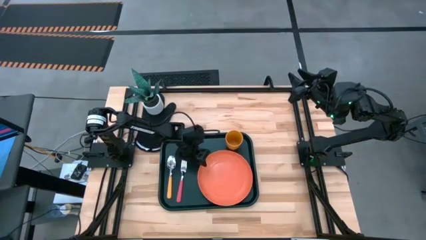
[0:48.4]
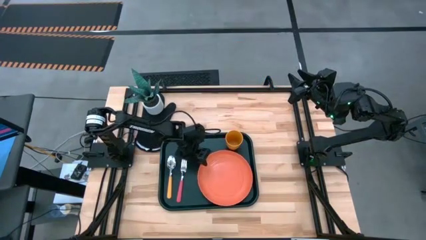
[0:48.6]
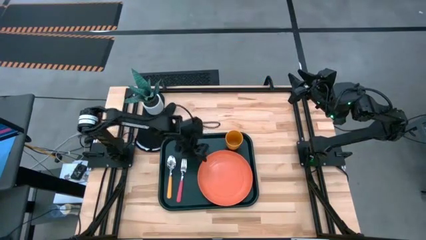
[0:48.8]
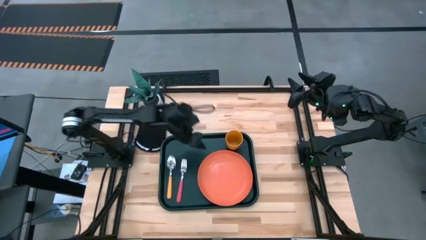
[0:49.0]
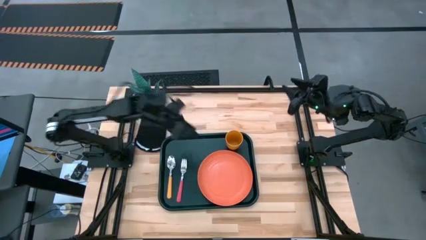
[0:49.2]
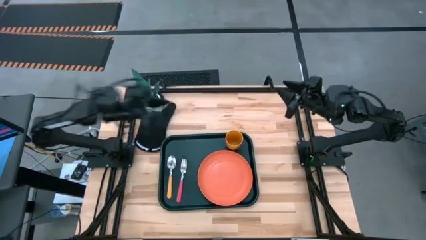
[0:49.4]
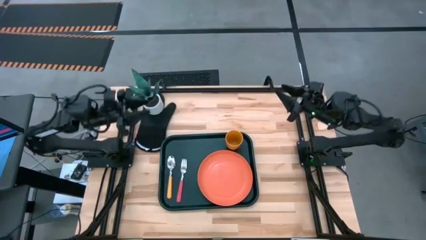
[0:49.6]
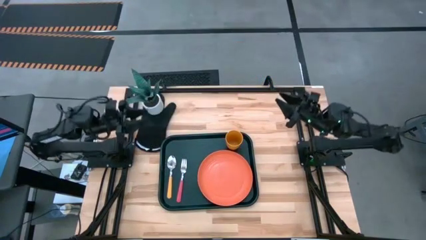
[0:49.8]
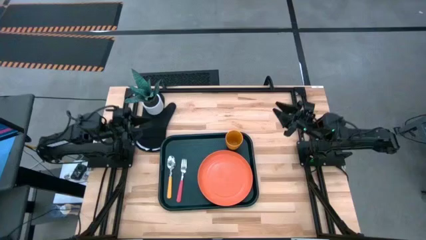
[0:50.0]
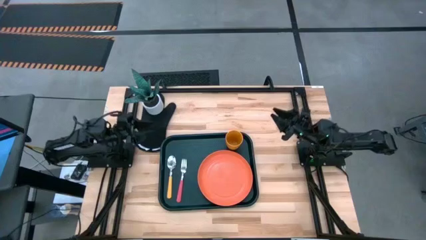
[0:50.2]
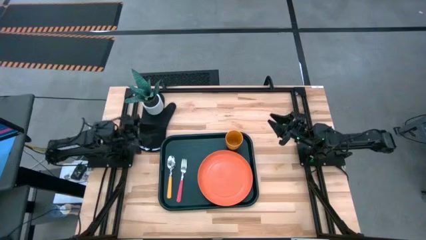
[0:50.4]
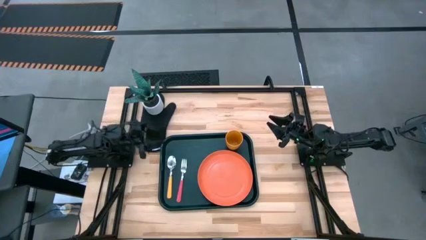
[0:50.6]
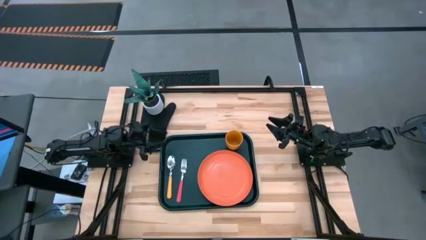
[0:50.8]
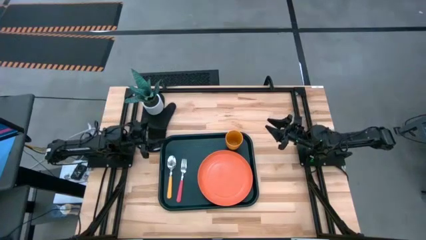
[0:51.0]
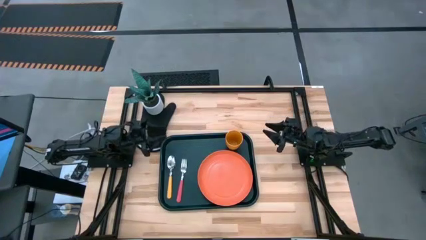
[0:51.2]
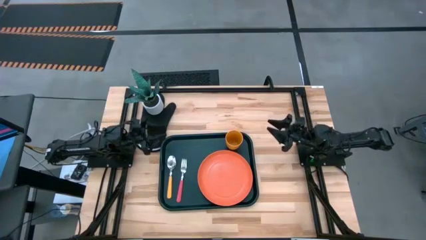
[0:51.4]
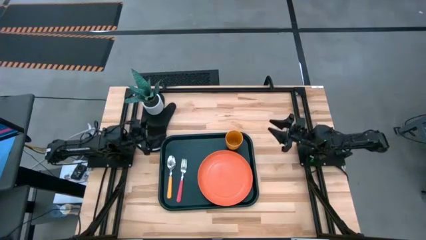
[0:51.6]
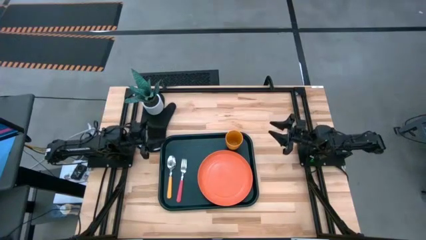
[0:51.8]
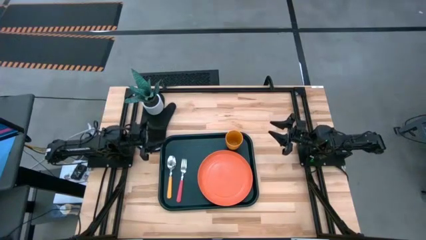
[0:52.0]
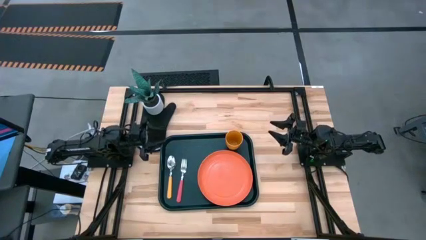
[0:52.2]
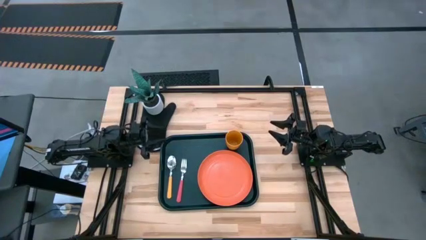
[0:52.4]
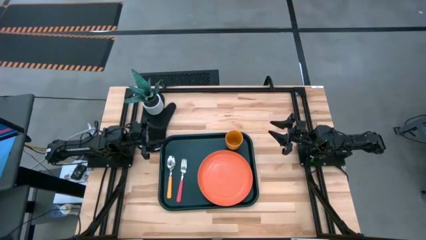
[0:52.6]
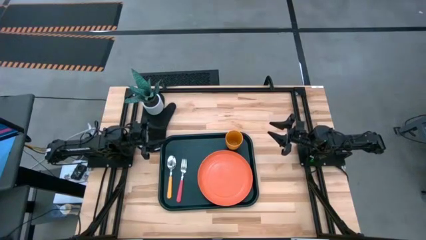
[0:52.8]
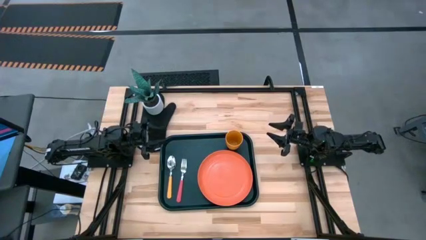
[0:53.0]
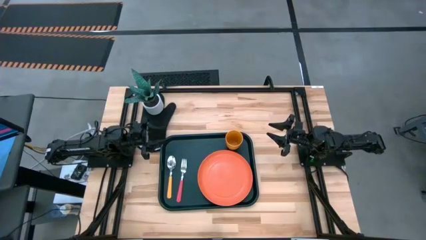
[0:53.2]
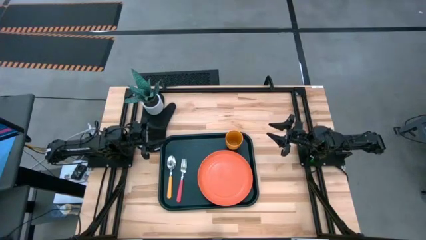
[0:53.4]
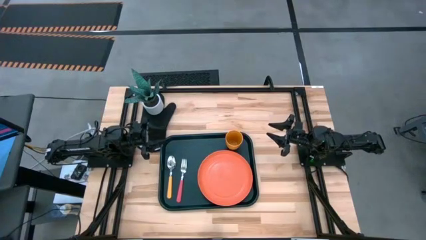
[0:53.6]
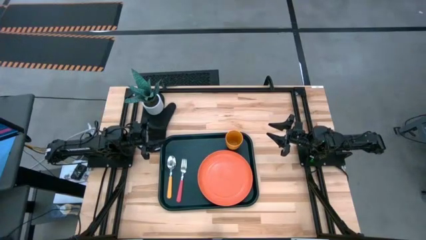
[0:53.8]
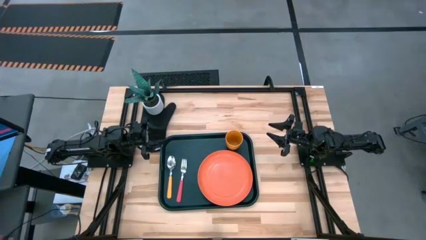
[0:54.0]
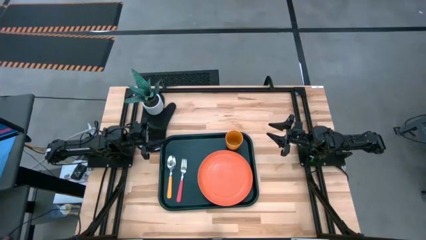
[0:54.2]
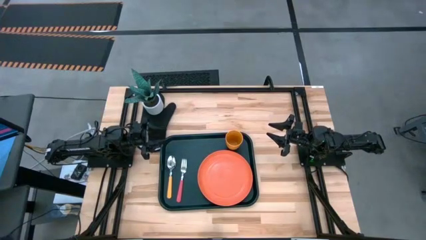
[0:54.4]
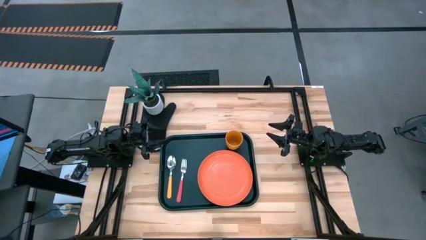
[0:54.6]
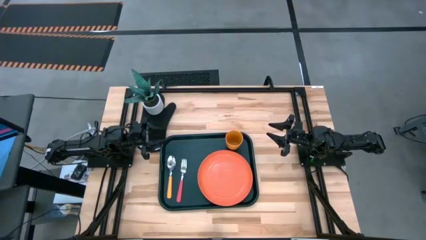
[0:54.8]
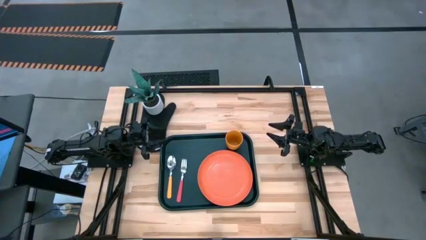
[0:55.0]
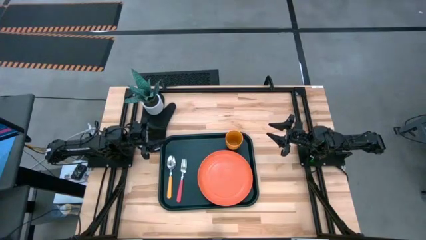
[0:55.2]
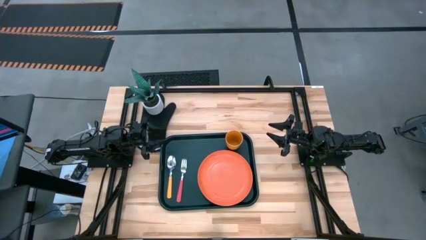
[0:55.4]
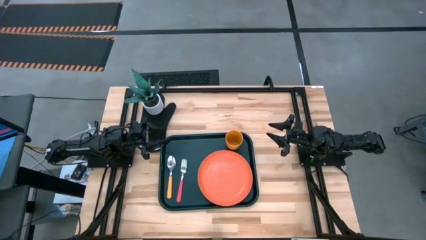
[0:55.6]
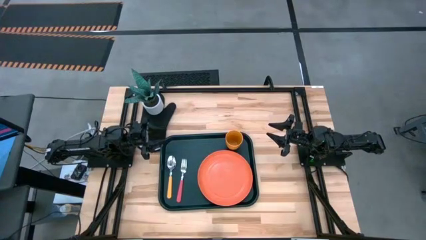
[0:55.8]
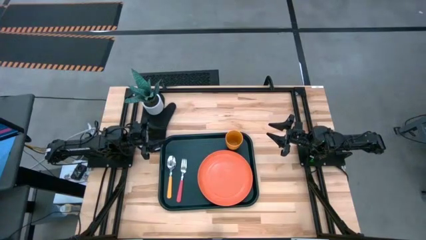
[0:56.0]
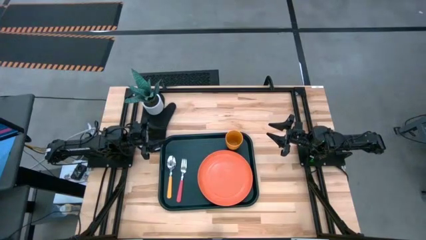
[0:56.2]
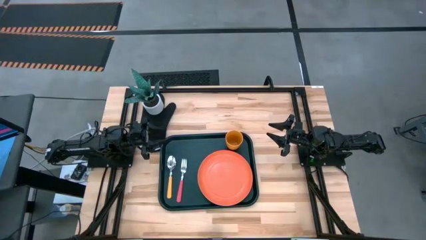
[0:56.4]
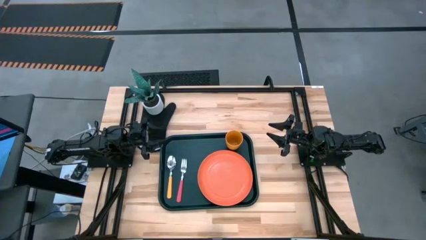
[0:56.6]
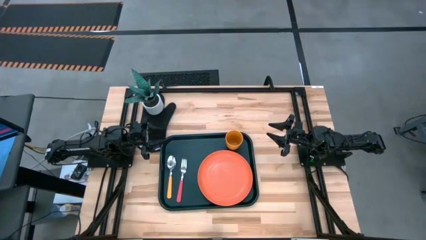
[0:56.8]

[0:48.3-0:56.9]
Task: Pick and place plate/cup/fork/spoon on tray
Return to Home Position

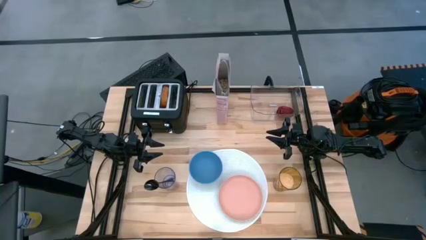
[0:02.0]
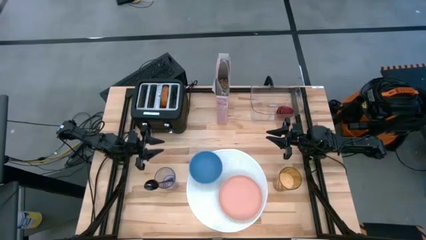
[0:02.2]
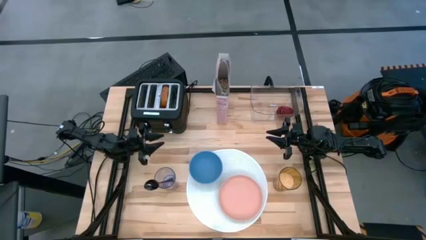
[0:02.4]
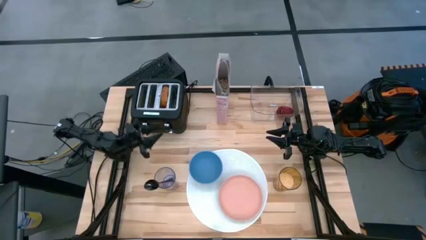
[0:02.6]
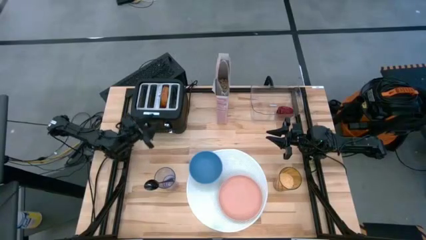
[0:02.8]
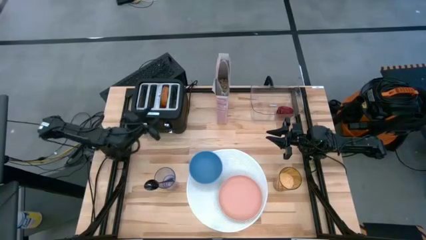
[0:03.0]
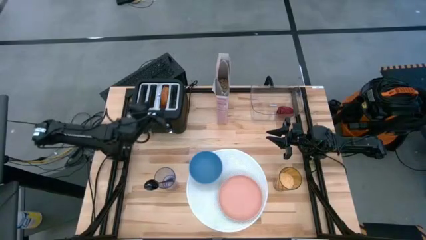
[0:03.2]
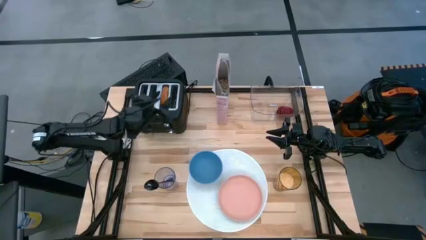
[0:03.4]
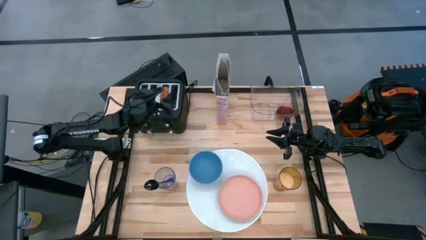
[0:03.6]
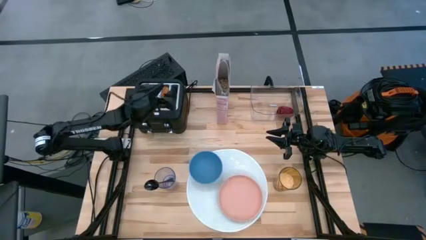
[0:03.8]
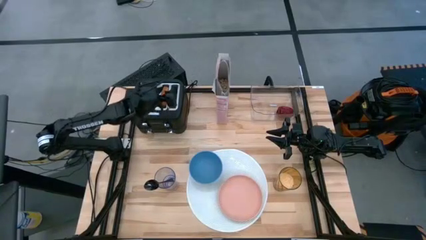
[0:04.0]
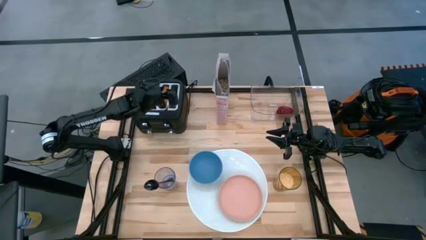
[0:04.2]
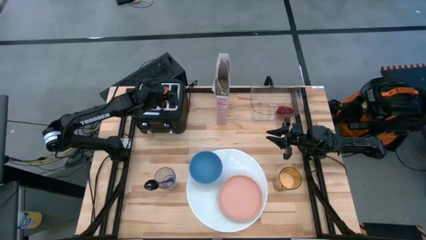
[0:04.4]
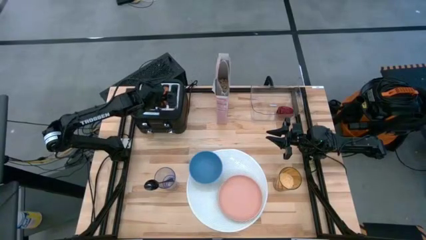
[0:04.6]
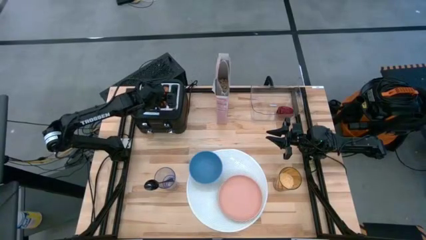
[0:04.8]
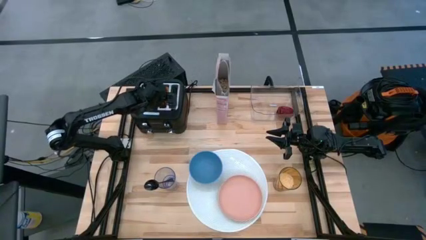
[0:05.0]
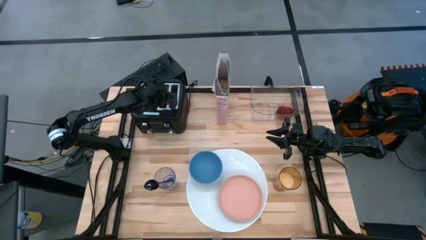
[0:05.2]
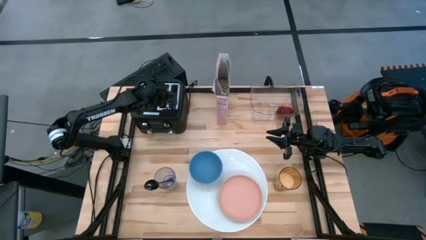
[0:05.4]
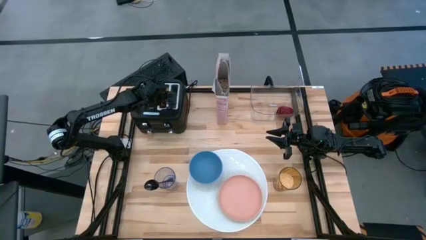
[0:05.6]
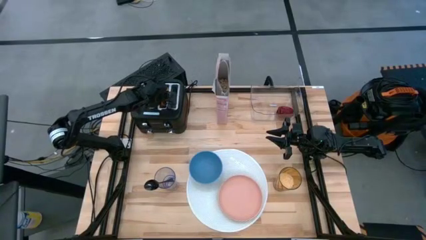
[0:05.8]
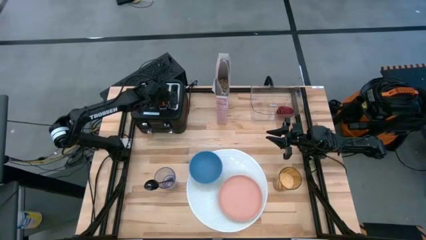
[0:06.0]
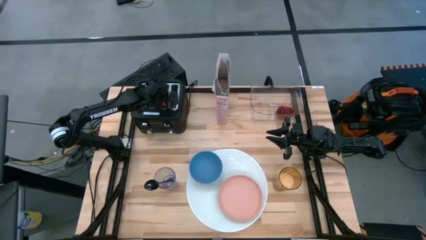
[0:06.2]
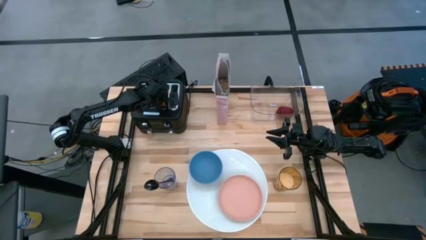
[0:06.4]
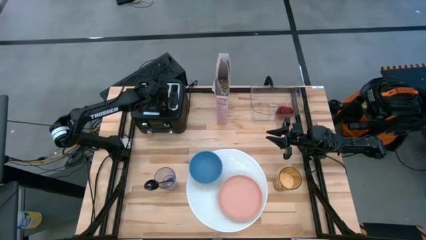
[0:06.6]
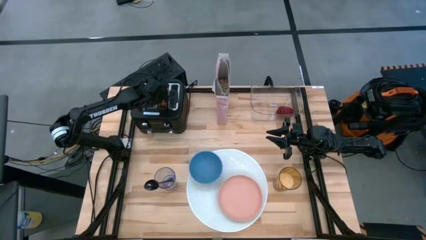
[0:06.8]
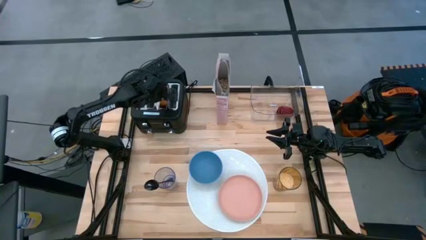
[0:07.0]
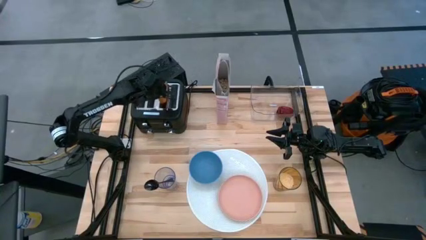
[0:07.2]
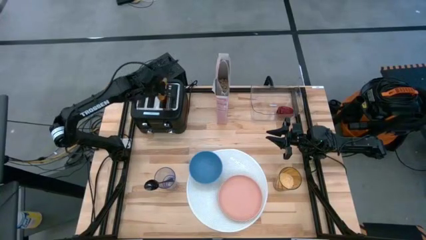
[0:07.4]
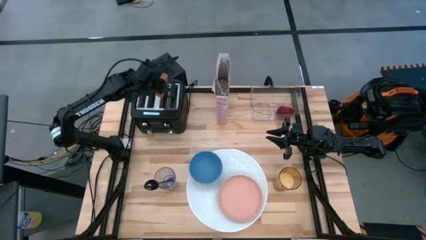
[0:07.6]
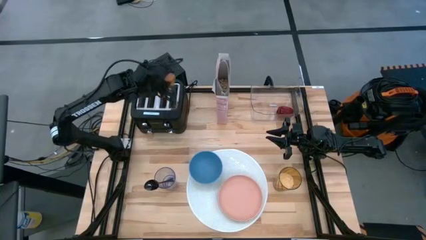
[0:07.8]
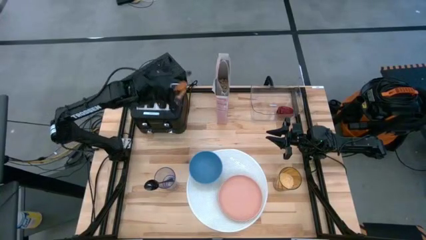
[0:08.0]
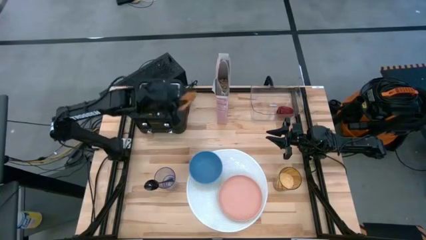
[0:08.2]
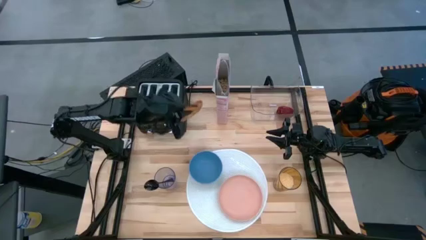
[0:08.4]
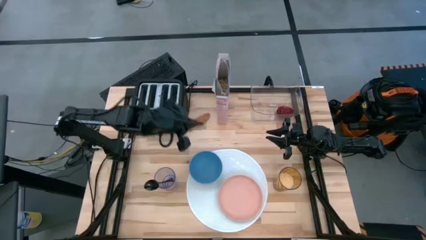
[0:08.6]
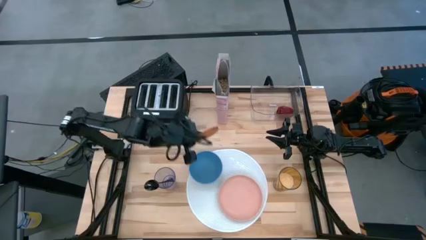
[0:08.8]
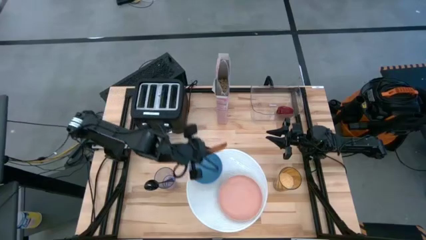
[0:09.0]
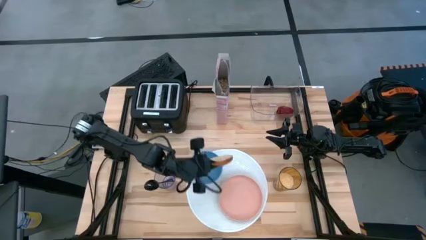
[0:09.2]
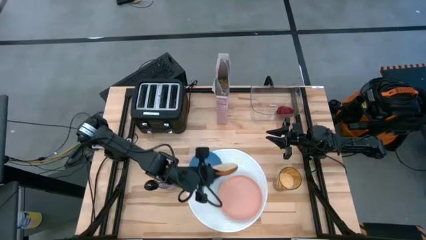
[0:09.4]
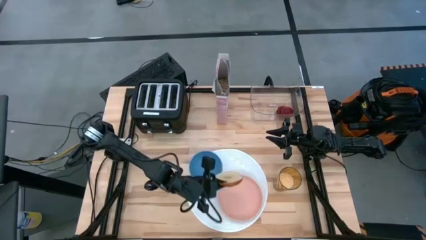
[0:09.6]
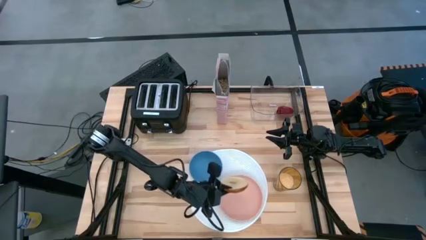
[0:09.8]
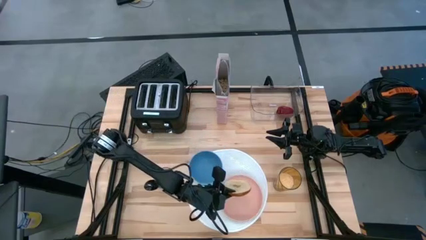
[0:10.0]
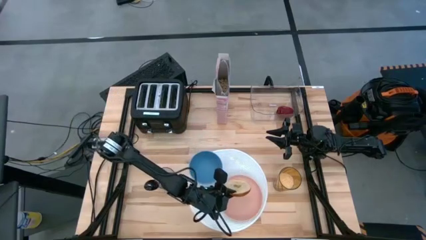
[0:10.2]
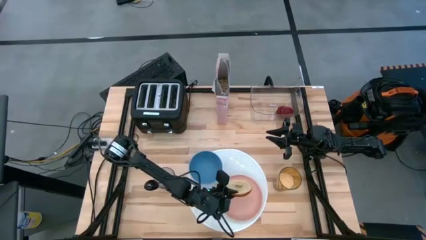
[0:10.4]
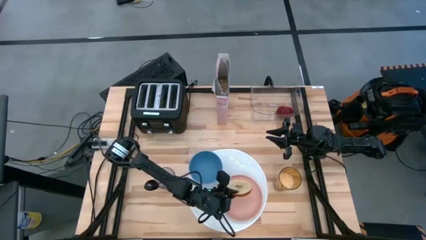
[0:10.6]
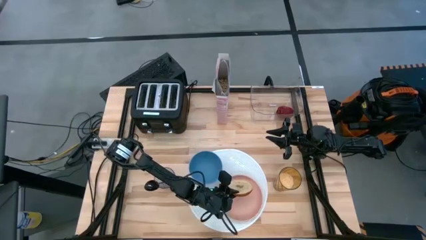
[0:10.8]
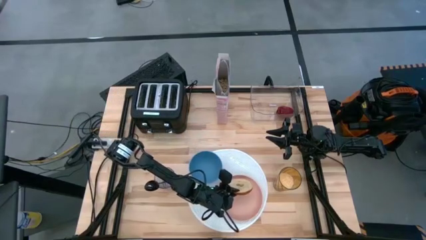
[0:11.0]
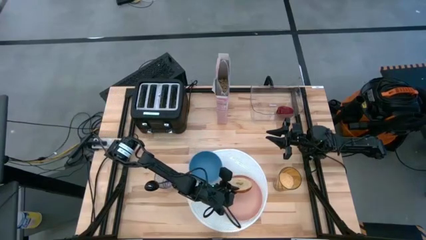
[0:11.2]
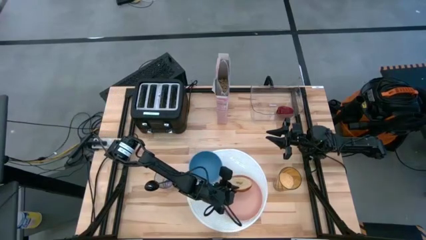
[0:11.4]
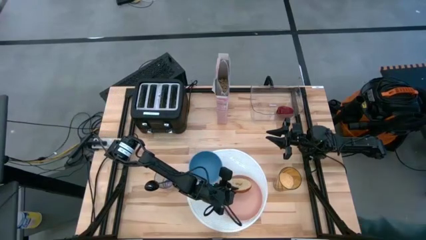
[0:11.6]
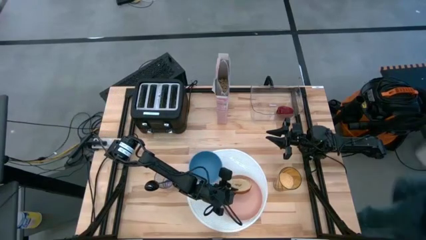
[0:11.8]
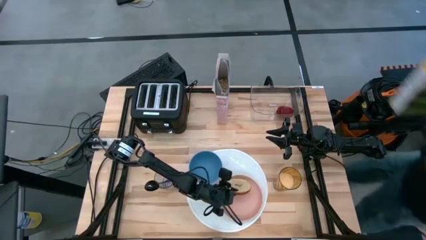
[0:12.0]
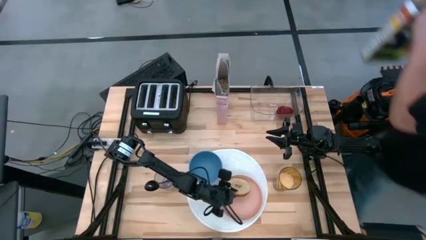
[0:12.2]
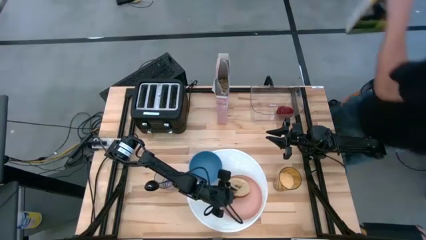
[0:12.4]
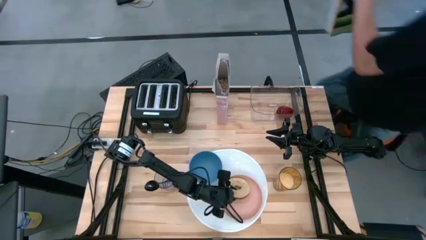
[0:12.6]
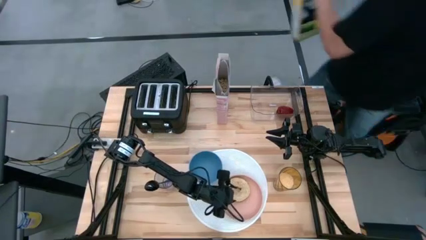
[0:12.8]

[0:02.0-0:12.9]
Task: Arrange a breakfast setting
Put the toasted bagel from the toaster on the pink plate
